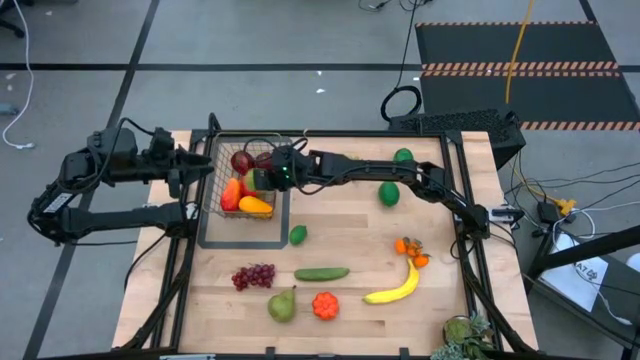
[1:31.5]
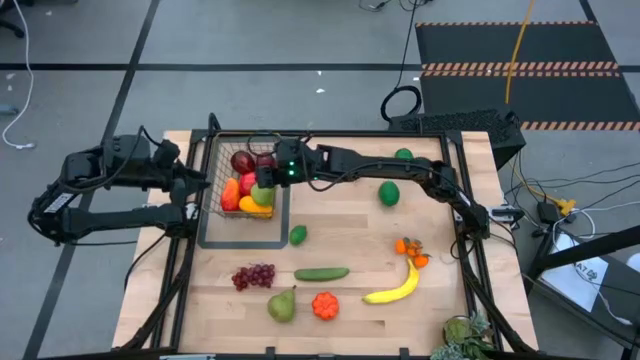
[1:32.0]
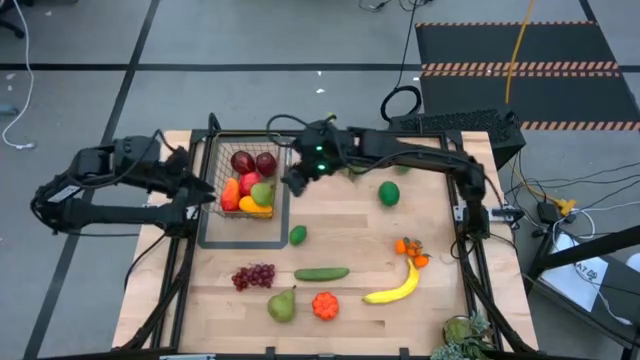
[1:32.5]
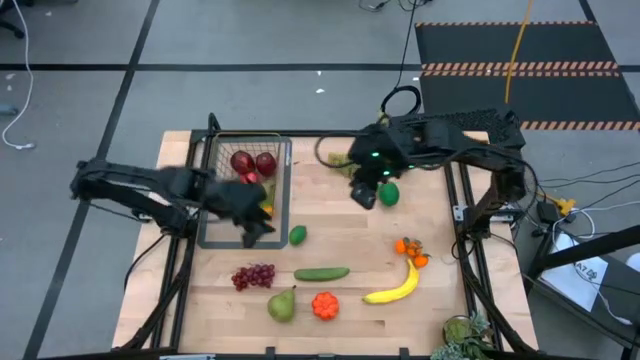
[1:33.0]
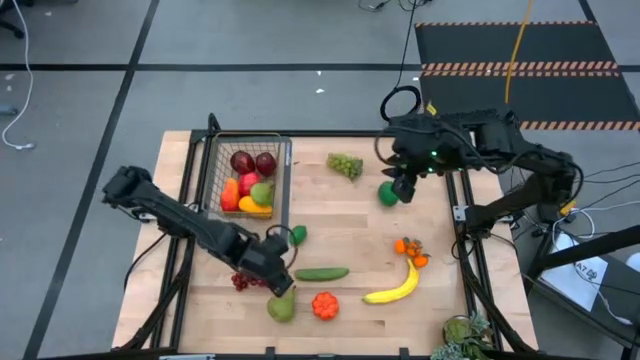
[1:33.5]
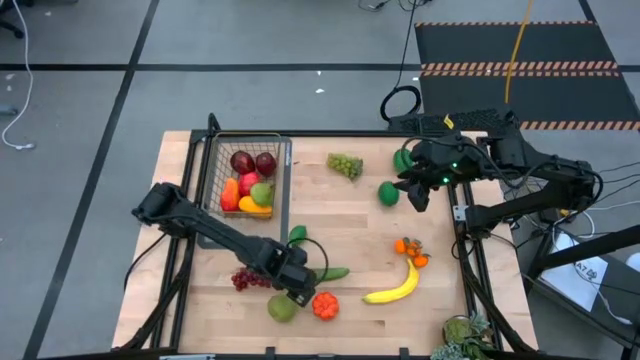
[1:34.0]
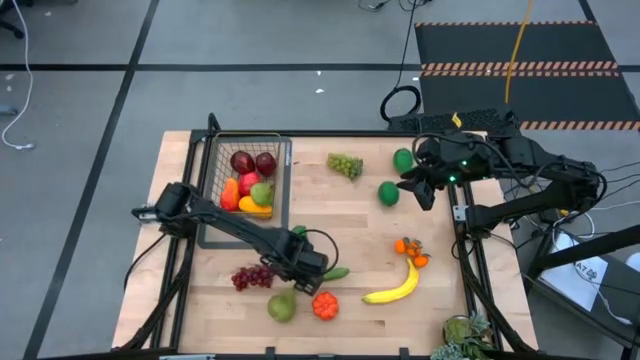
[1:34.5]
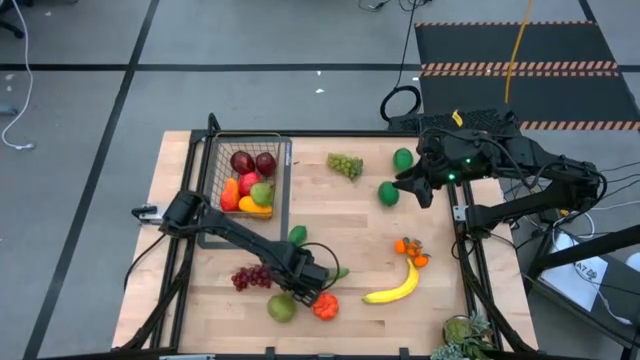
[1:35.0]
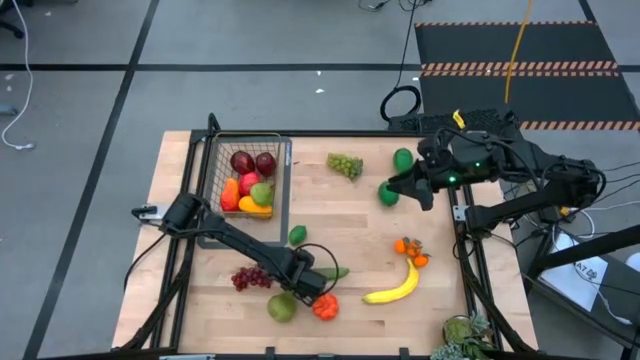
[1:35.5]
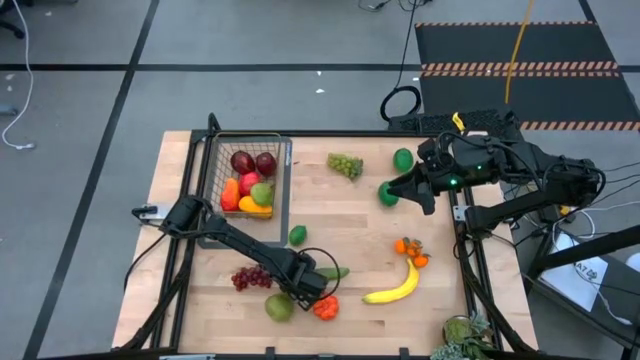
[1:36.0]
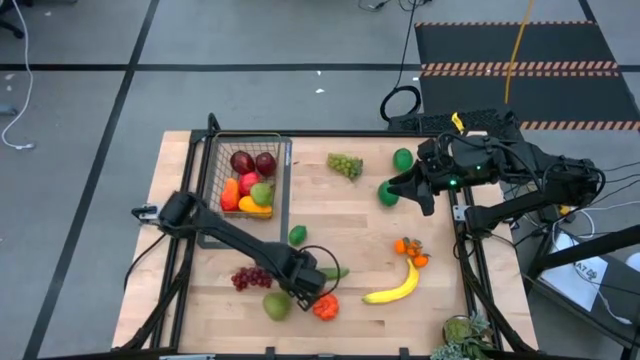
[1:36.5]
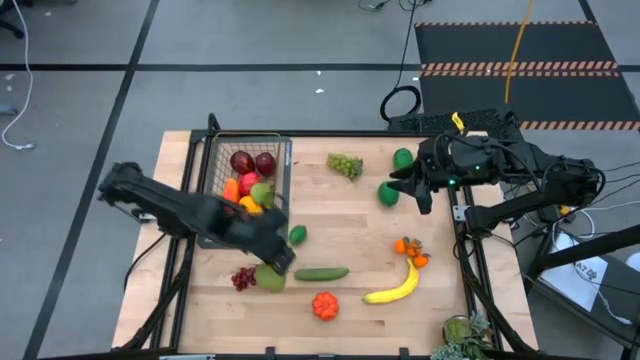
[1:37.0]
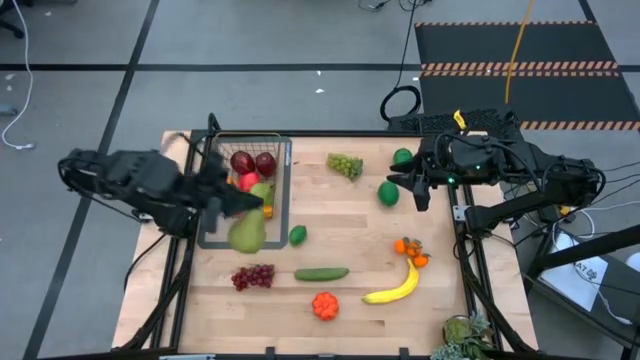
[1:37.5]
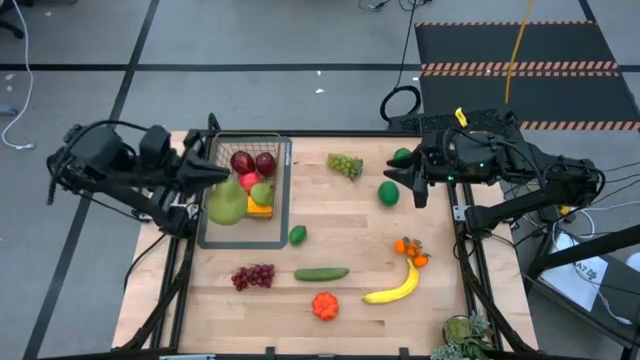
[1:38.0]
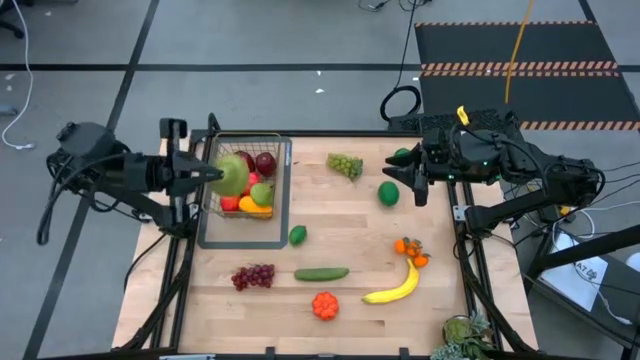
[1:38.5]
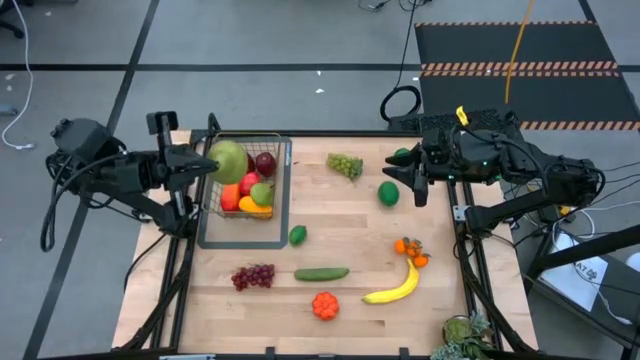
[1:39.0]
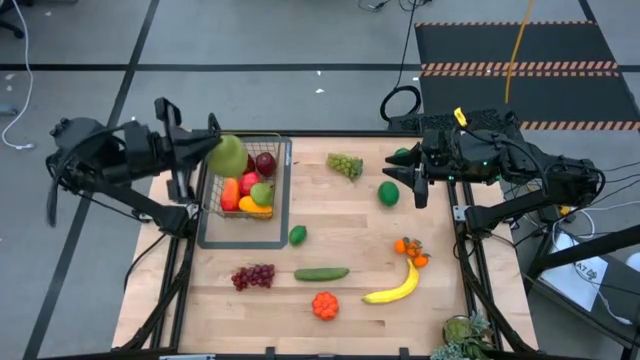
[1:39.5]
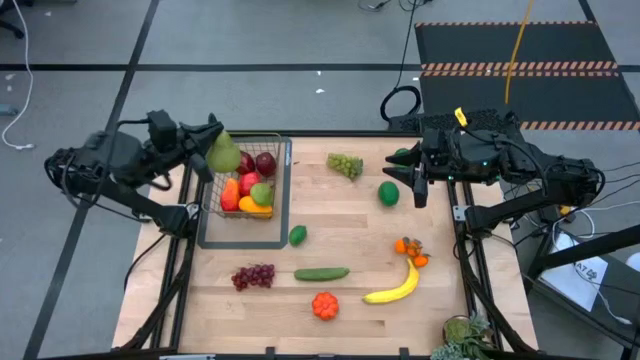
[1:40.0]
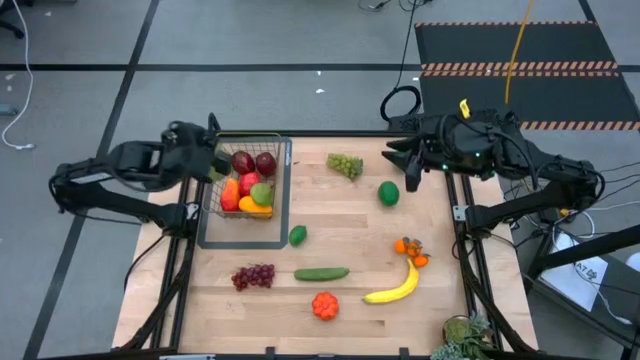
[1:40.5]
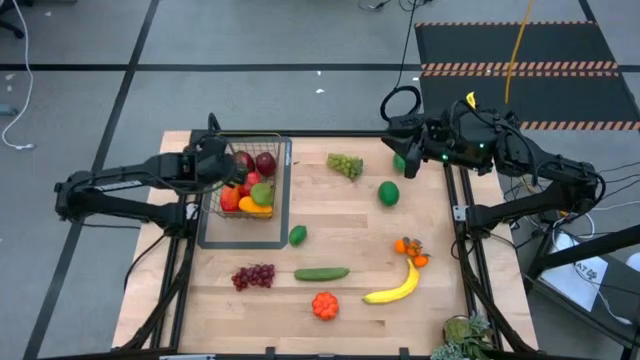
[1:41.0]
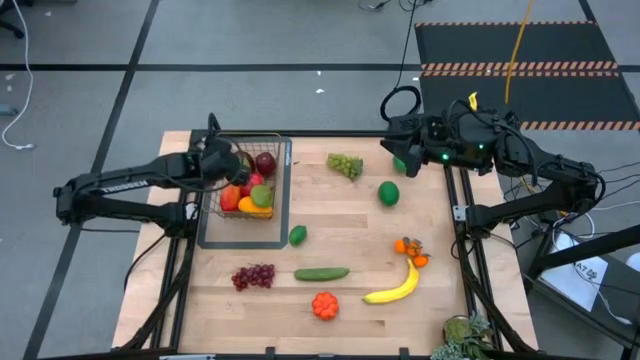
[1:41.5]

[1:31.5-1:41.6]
Task: Build produce basket
Put the pear into the wire basket

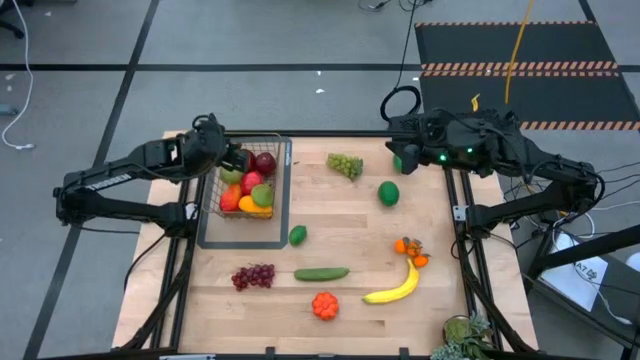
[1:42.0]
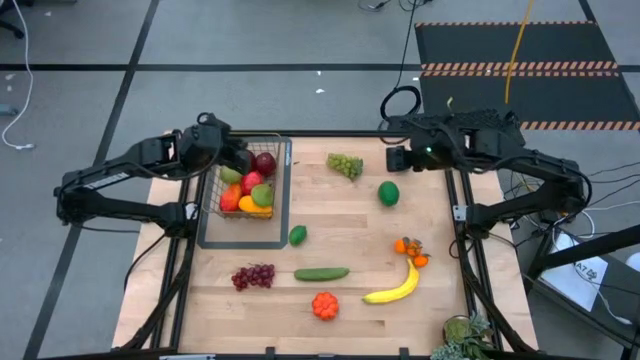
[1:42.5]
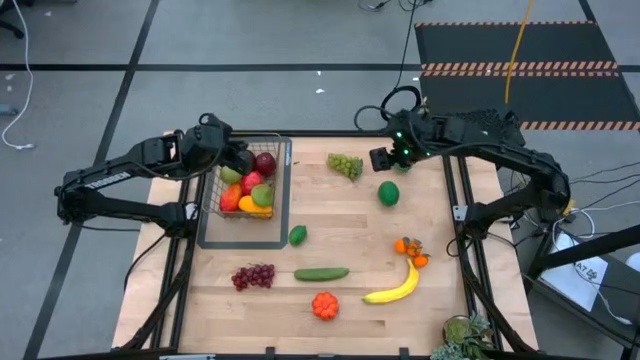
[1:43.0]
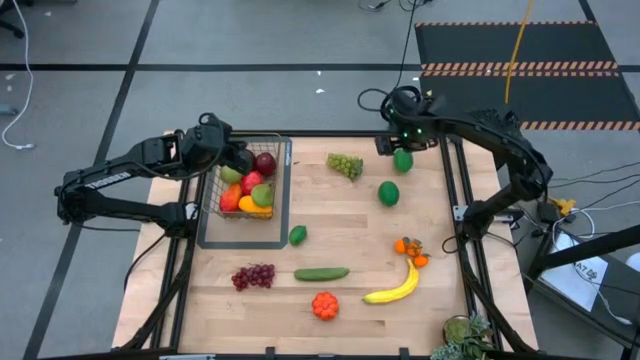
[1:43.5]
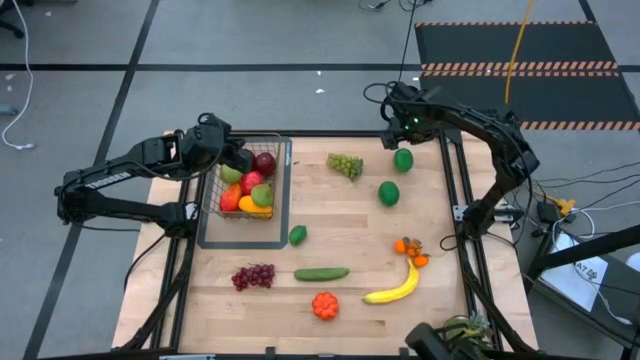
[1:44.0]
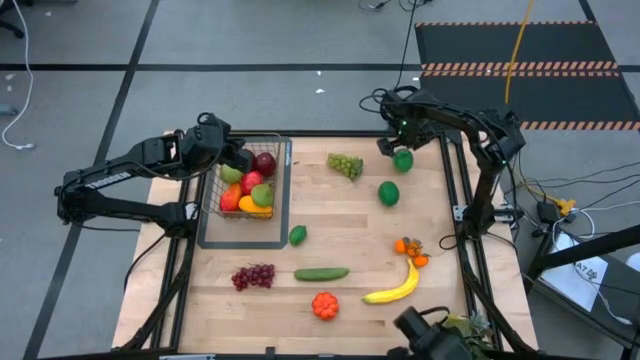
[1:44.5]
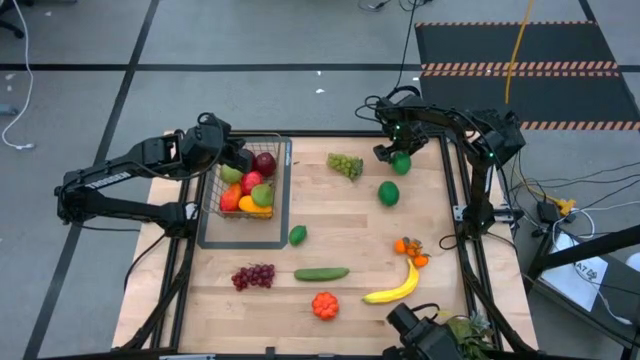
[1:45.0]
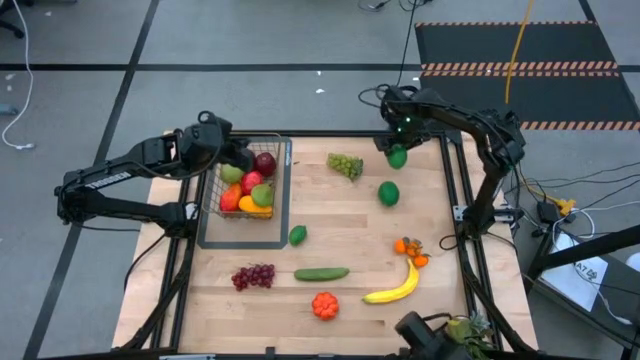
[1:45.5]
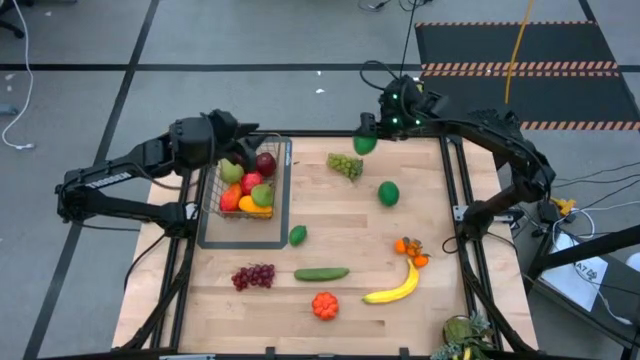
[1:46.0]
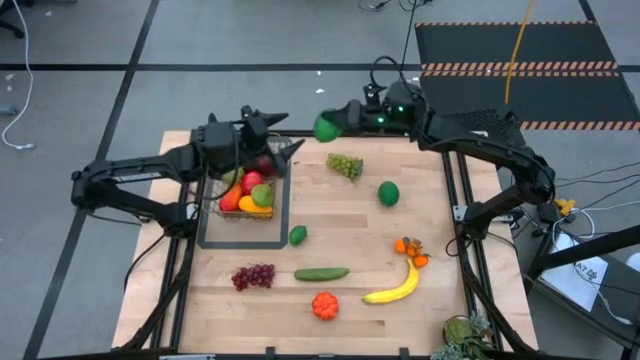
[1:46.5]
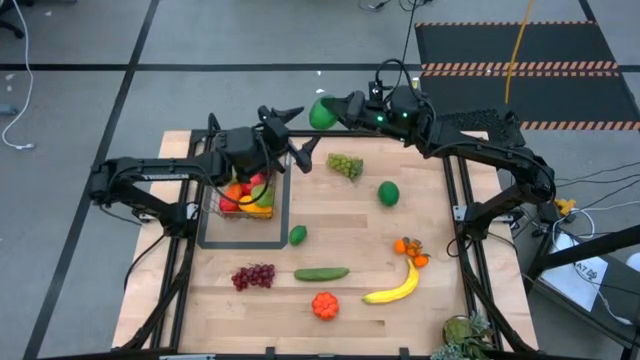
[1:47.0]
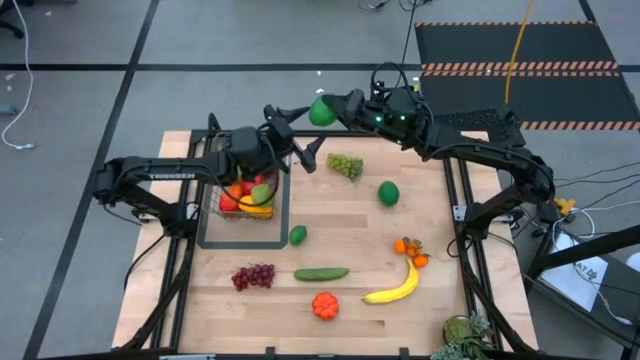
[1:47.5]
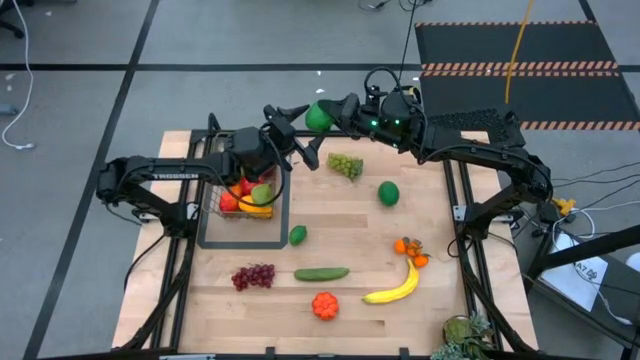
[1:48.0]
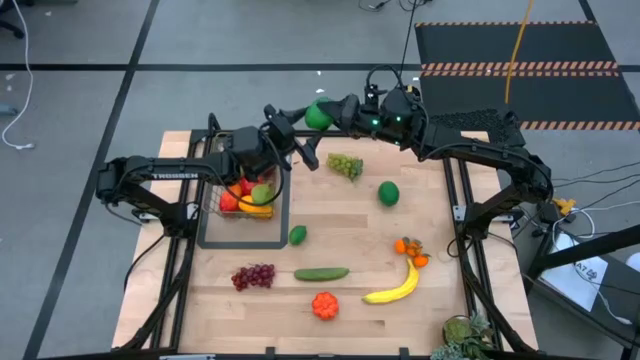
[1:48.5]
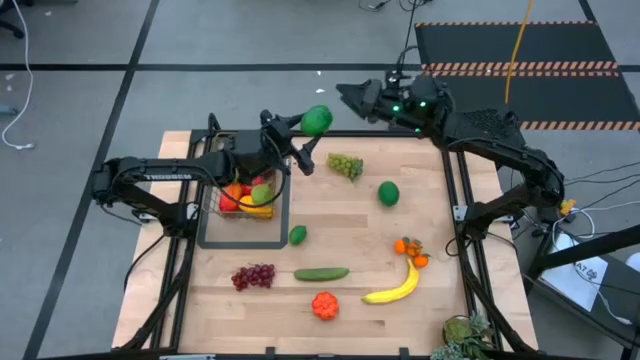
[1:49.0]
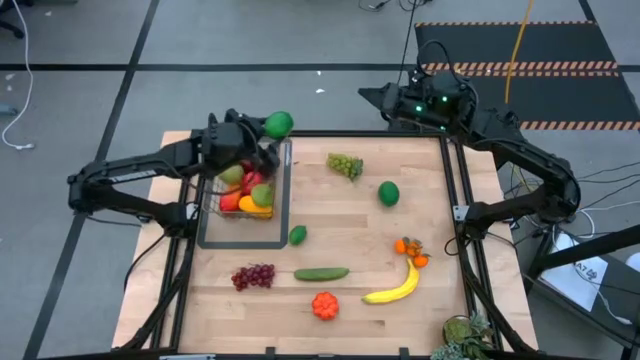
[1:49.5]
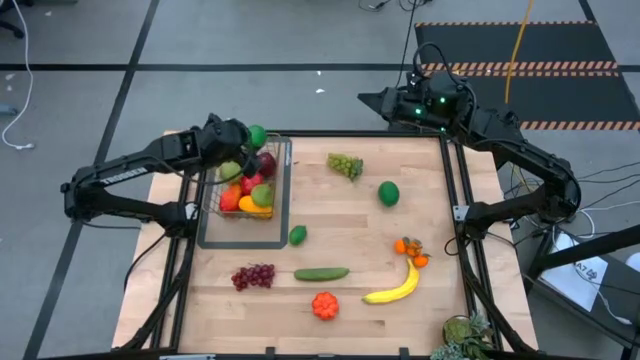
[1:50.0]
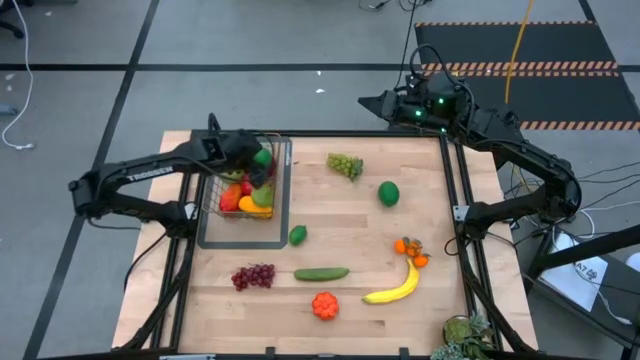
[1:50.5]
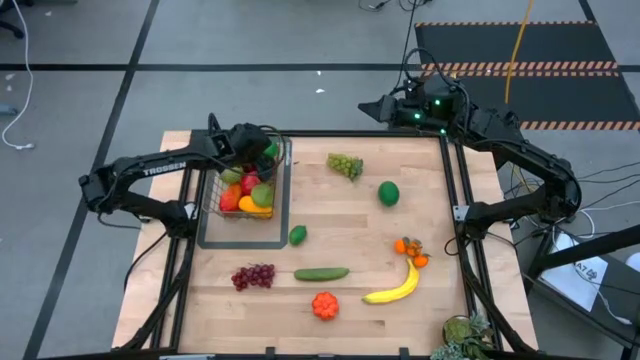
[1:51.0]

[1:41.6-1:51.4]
Put the top lime into the wire basket

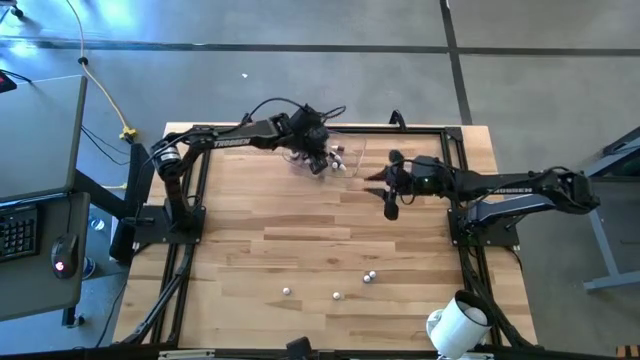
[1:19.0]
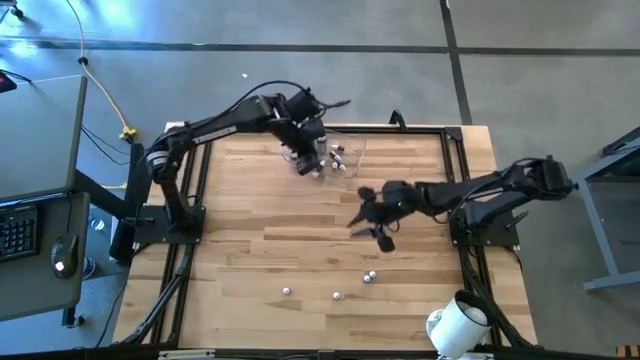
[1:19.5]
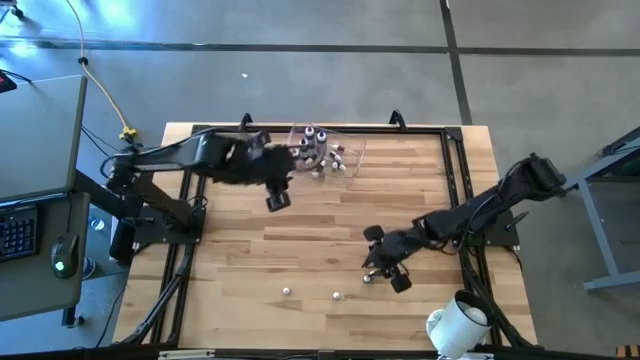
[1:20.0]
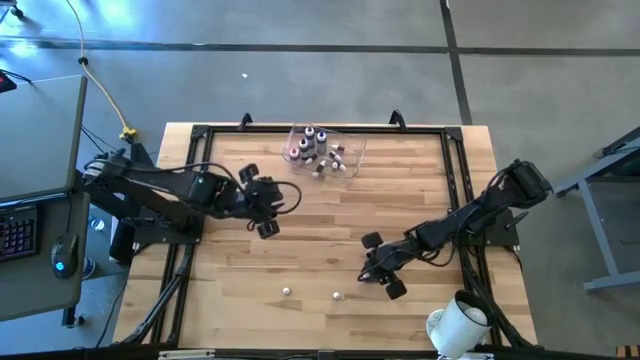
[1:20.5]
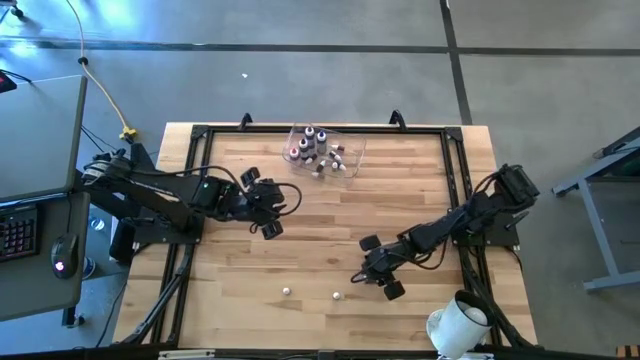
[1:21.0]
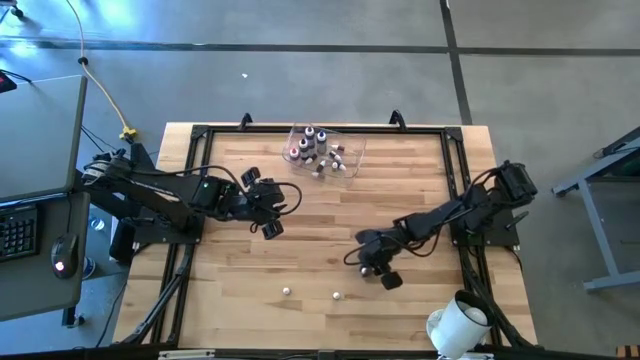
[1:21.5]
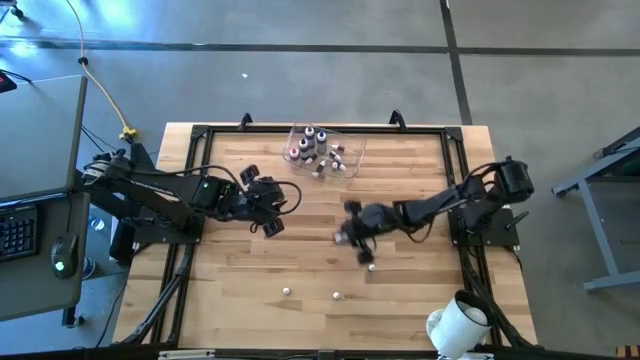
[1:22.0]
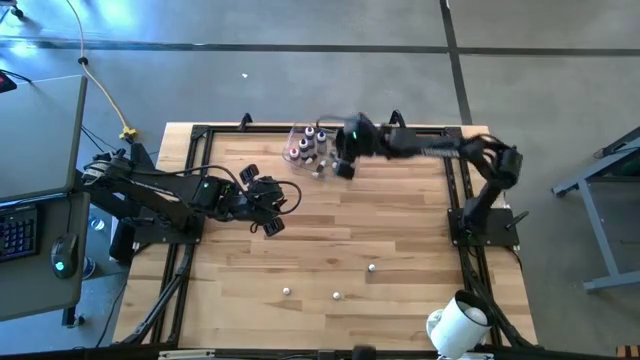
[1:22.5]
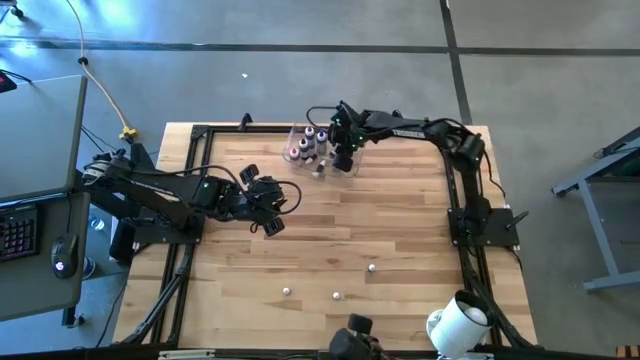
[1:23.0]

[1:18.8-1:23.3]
Task: Pick & Place food coloring
Put the green food coloring into the transparent bin
